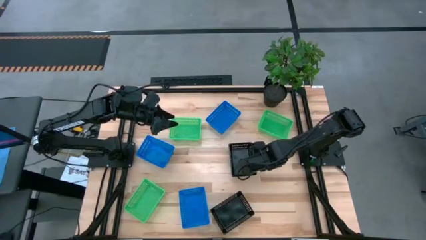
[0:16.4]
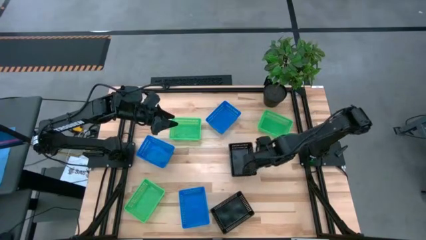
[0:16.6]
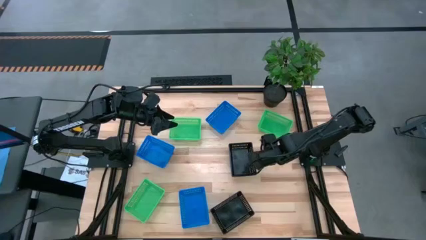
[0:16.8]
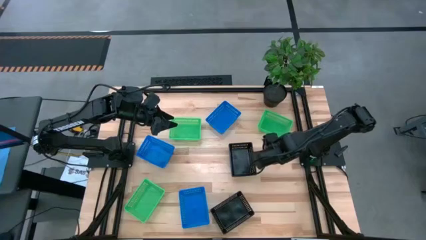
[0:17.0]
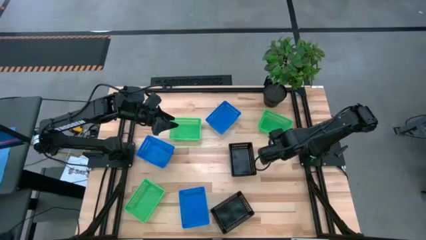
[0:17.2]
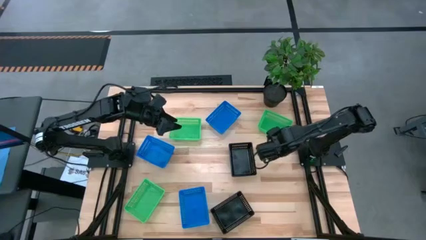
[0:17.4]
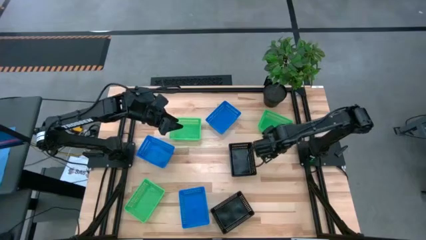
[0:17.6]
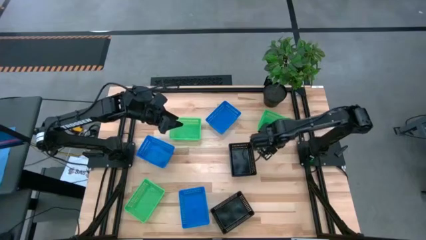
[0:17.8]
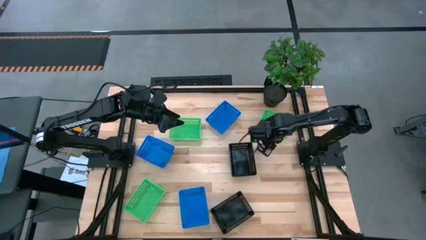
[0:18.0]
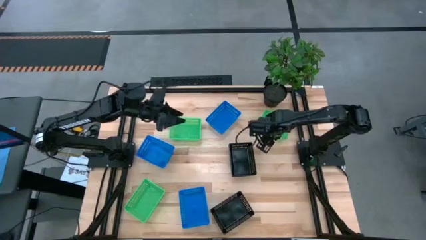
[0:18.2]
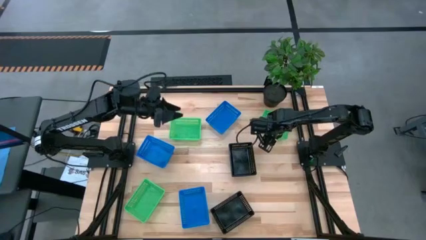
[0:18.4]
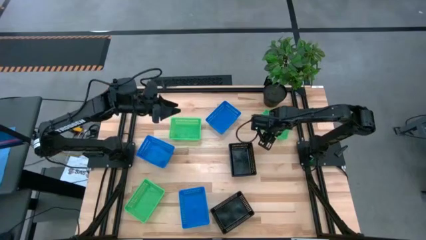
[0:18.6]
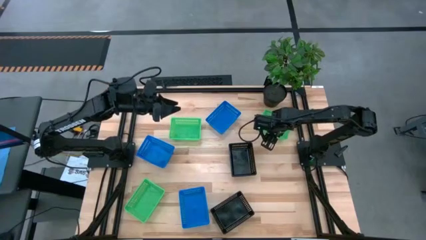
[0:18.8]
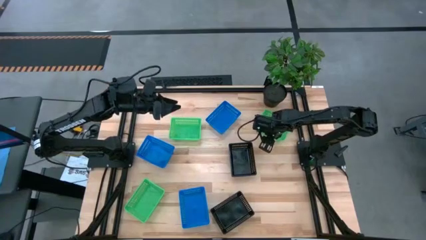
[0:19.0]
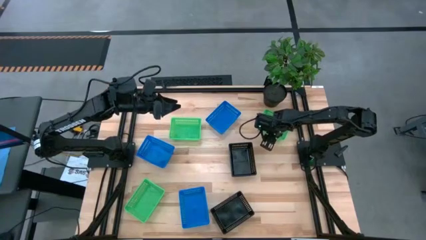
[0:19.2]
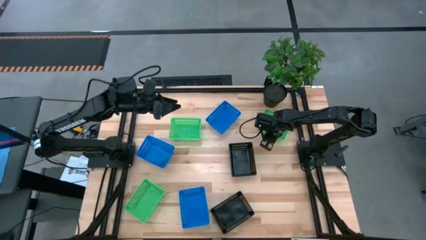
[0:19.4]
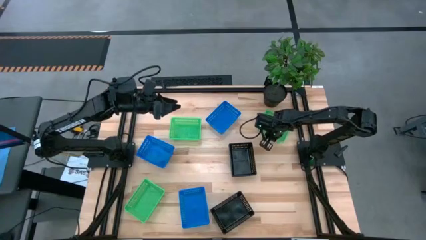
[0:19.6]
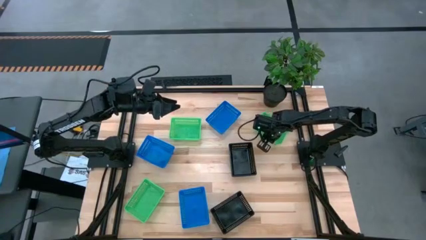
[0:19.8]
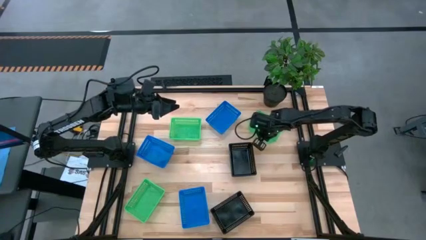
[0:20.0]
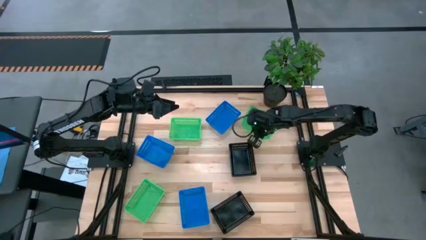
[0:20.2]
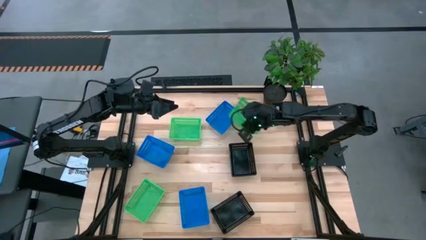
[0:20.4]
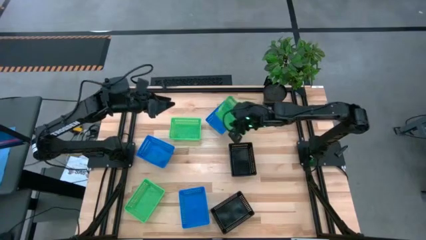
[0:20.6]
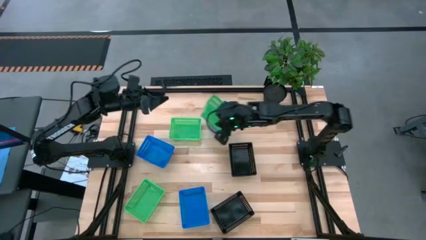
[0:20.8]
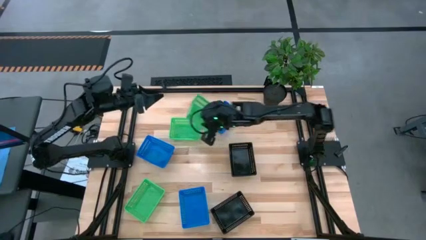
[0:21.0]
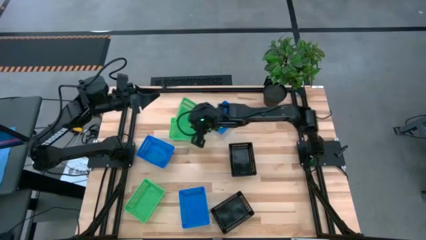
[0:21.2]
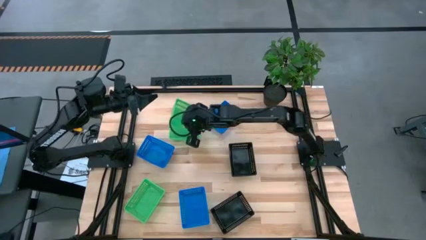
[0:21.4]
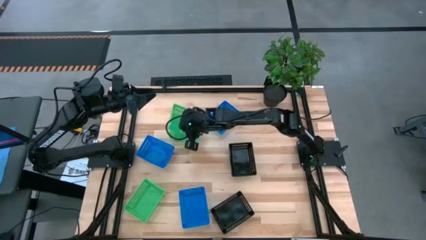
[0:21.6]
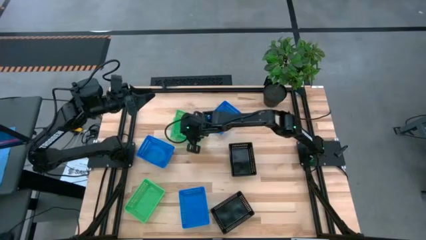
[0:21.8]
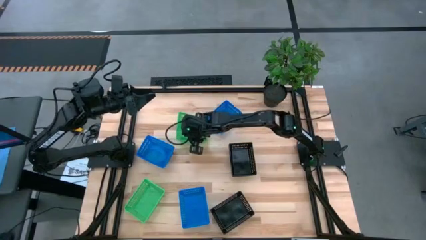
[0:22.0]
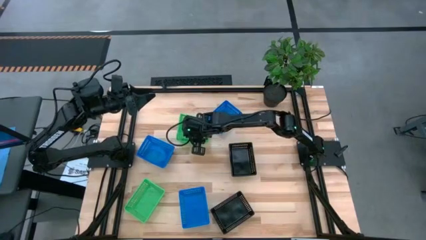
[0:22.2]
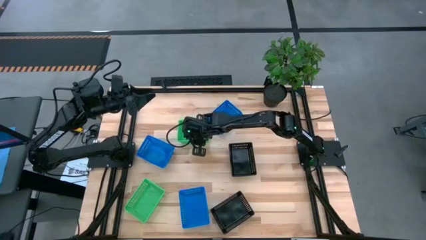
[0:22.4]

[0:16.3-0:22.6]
Stack the top right green bin on the top left green bin

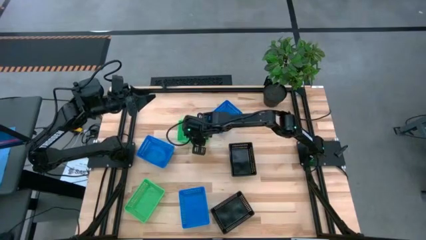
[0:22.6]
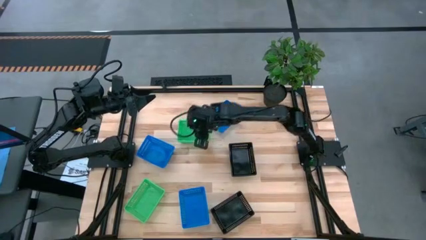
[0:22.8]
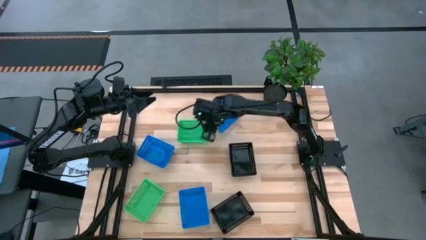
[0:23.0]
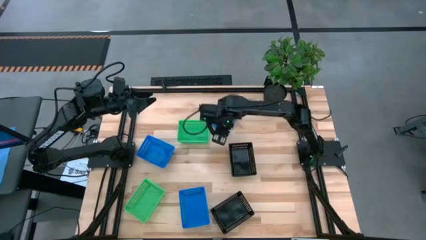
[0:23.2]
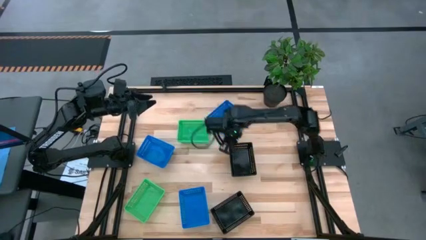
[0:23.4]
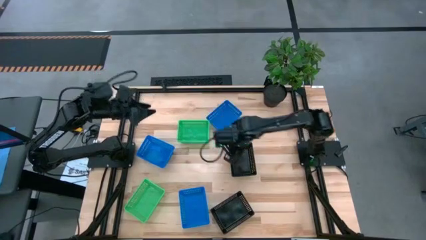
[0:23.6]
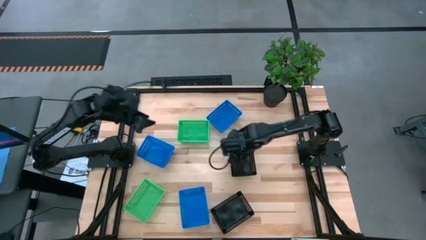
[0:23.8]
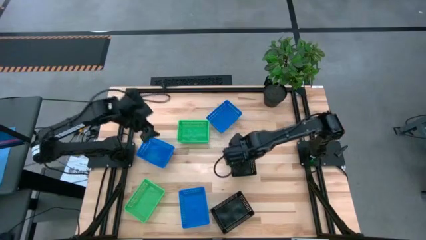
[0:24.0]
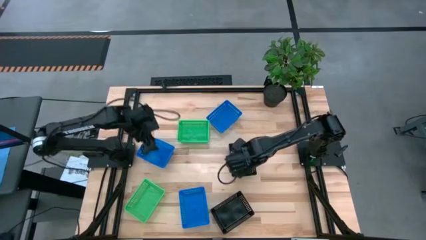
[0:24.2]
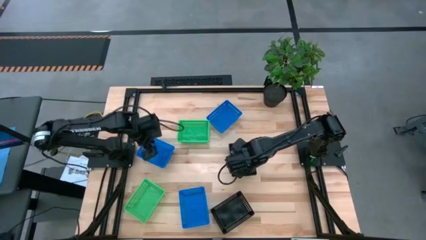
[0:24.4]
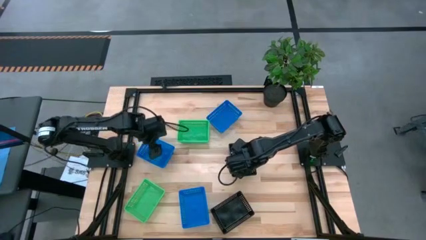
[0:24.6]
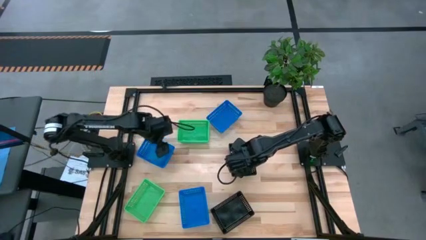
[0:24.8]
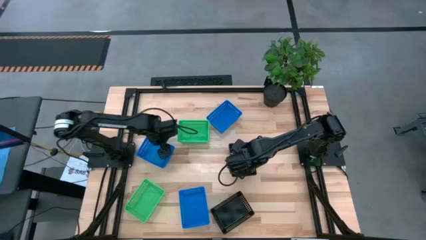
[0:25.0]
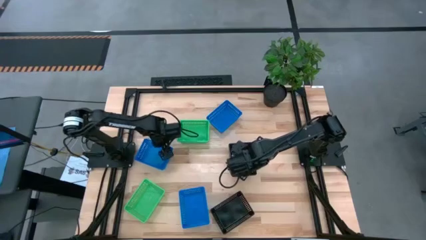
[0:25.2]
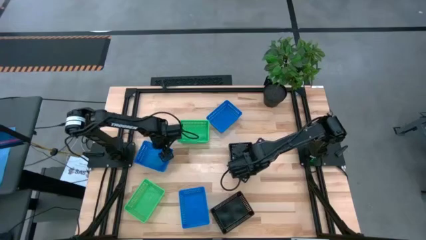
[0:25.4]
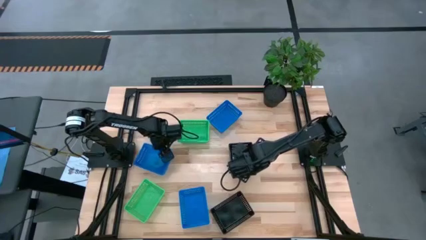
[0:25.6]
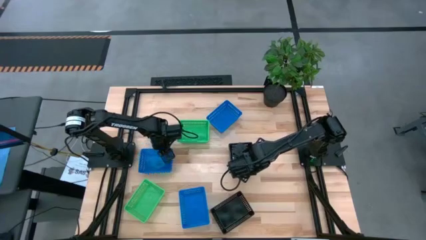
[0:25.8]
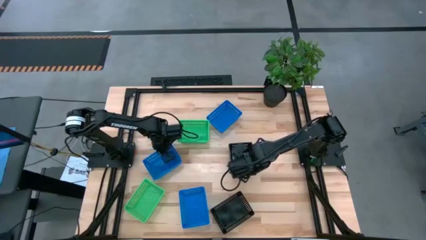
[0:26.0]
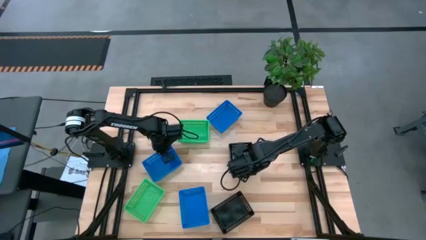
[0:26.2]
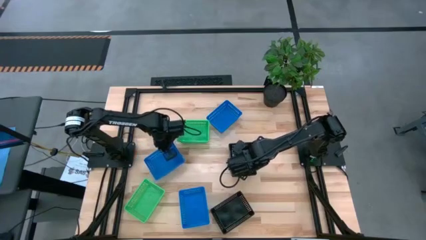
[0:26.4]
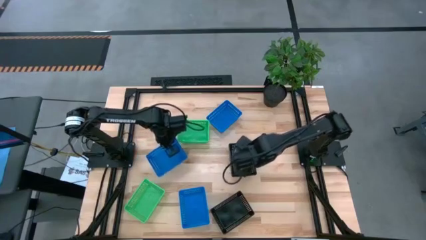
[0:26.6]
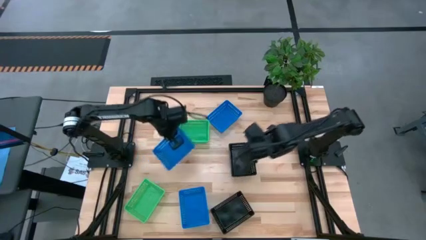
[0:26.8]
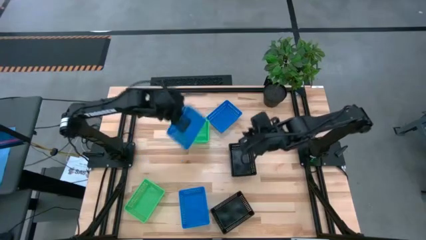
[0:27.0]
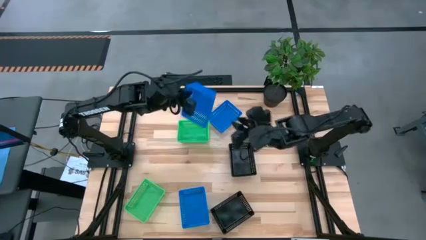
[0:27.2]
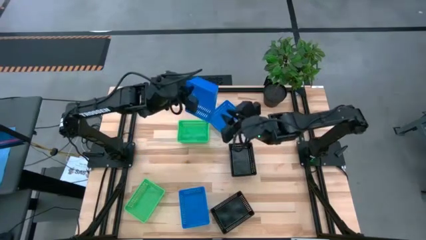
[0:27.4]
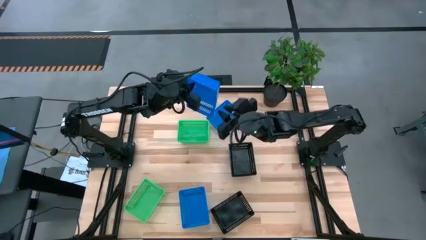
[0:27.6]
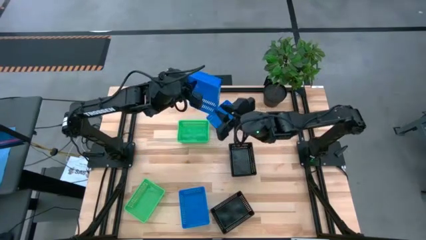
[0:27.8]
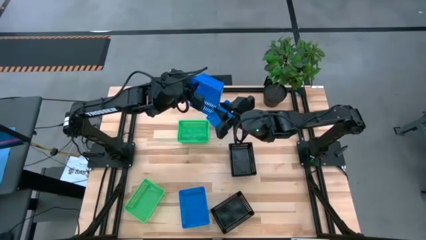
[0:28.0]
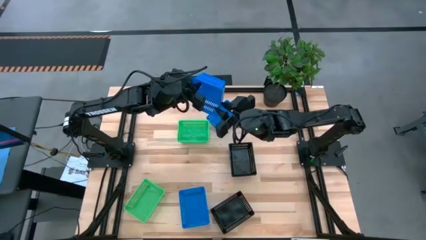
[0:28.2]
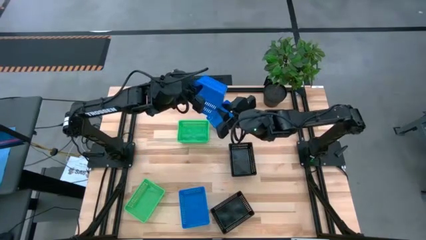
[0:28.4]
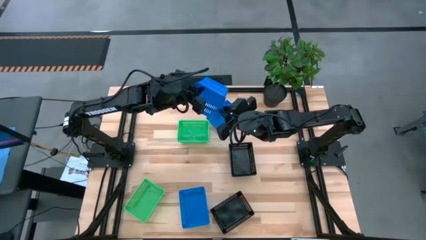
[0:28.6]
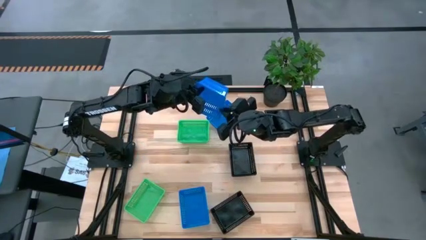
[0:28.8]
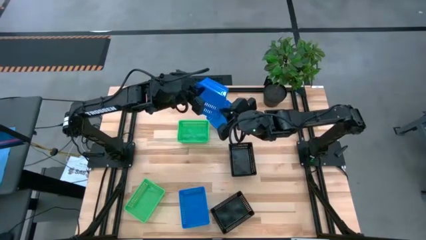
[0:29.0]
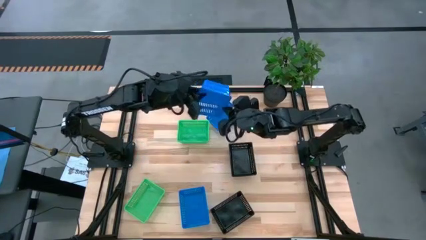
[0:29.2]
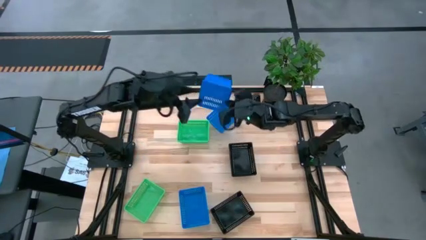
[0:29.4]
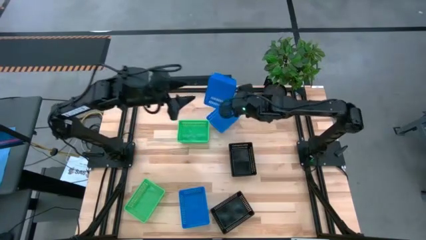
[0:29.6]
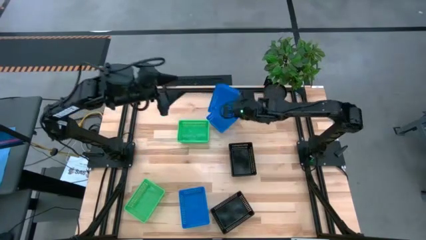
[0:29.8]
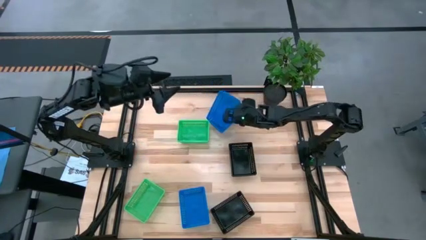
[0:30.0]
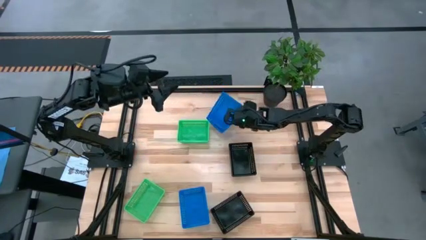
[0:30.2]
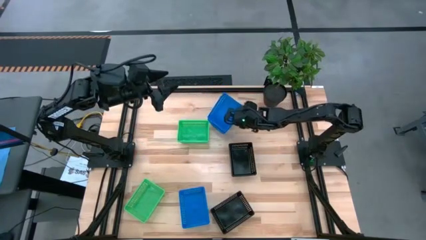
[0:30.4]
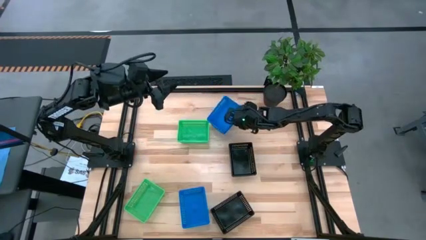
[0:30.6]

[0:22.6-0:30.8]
Stack the middle blue bin on the top blue bin
